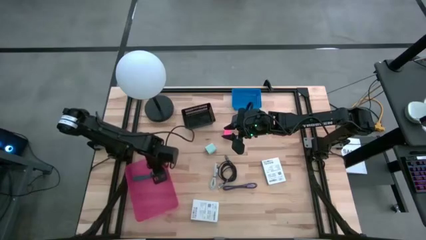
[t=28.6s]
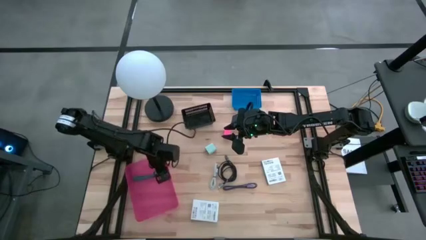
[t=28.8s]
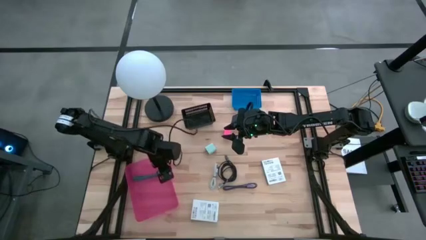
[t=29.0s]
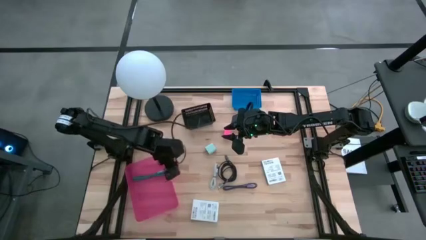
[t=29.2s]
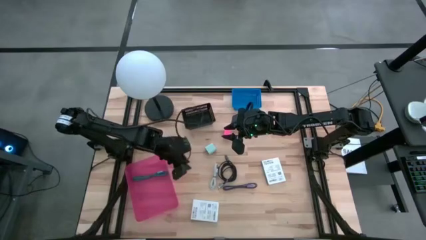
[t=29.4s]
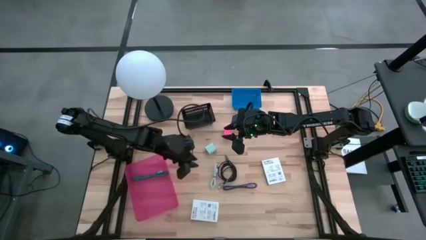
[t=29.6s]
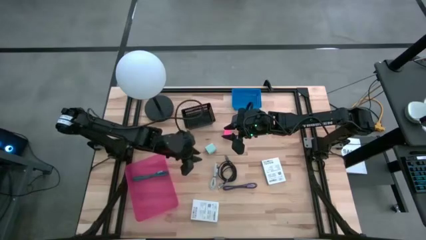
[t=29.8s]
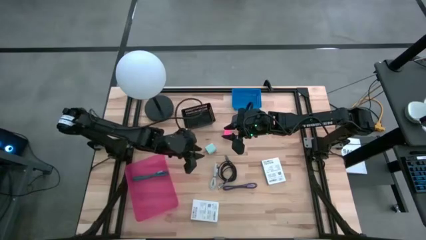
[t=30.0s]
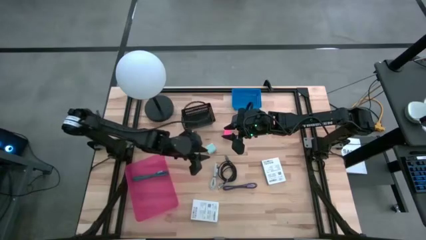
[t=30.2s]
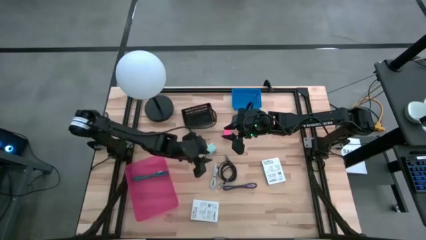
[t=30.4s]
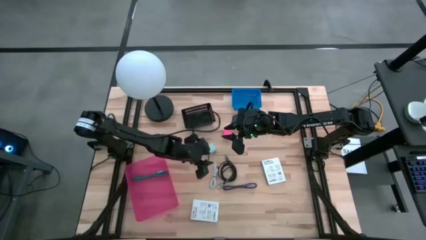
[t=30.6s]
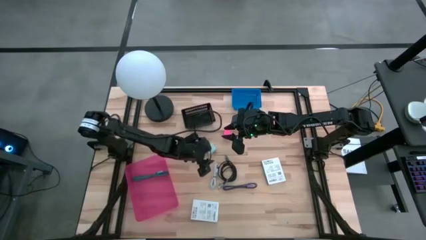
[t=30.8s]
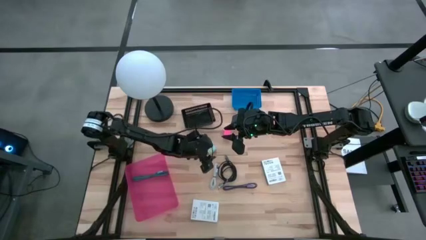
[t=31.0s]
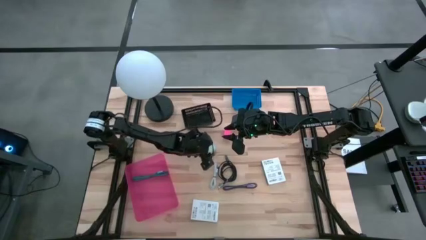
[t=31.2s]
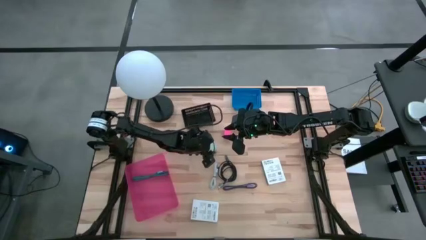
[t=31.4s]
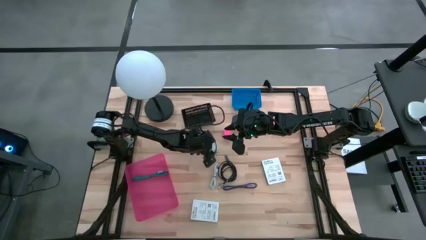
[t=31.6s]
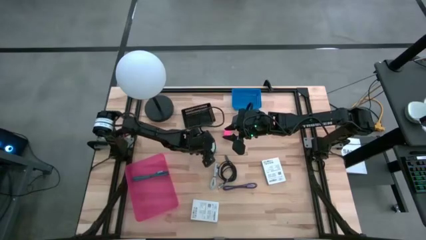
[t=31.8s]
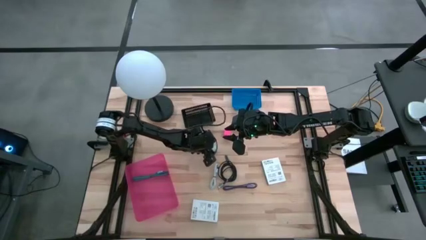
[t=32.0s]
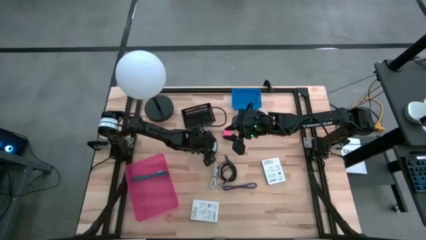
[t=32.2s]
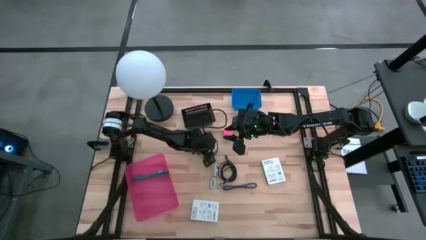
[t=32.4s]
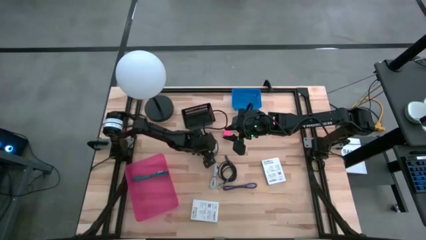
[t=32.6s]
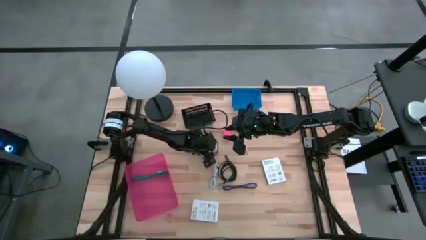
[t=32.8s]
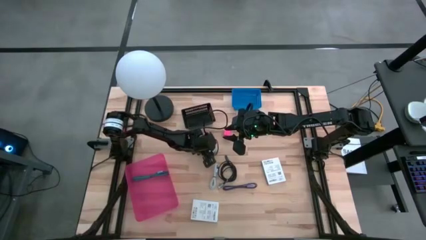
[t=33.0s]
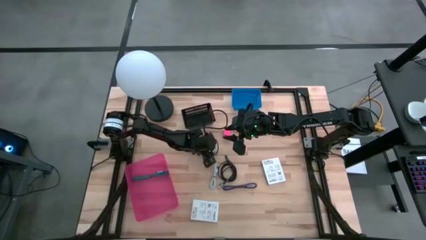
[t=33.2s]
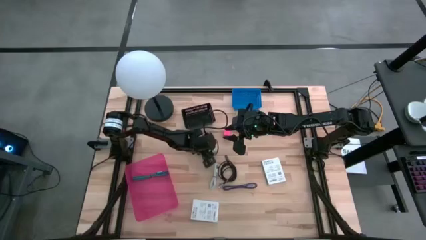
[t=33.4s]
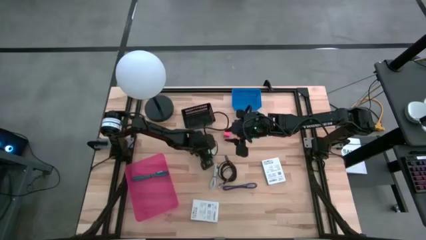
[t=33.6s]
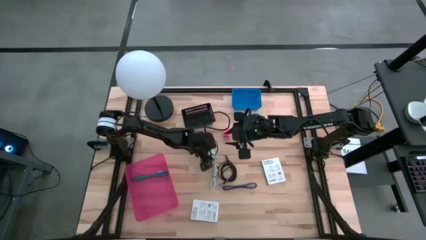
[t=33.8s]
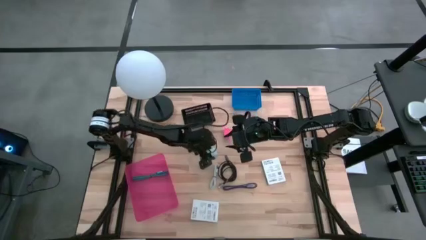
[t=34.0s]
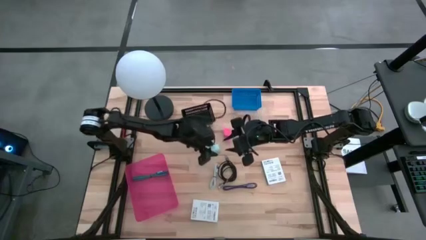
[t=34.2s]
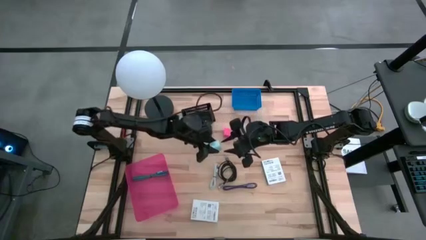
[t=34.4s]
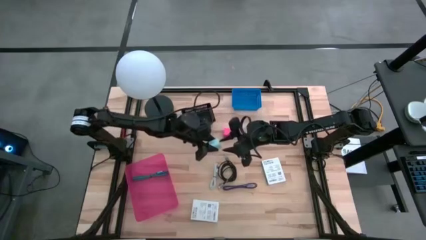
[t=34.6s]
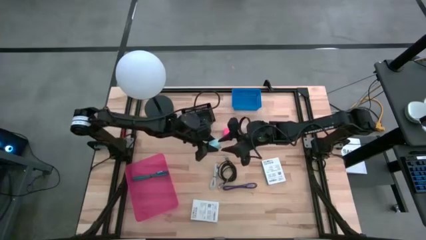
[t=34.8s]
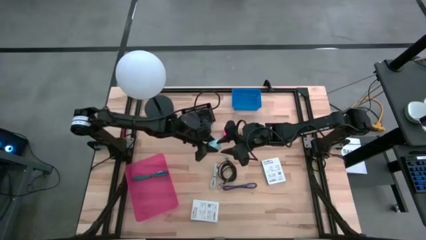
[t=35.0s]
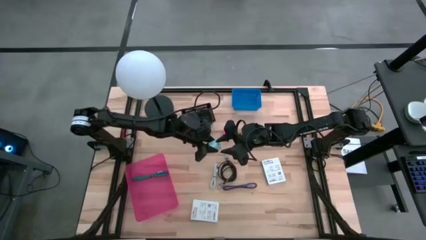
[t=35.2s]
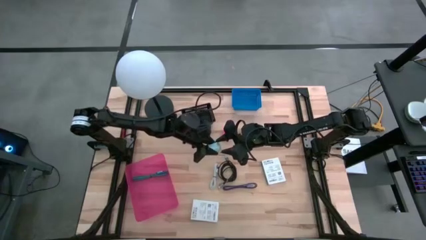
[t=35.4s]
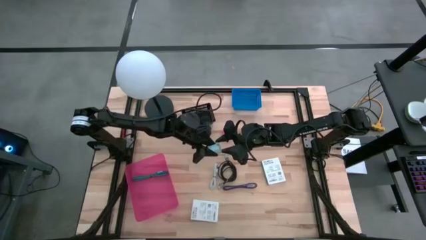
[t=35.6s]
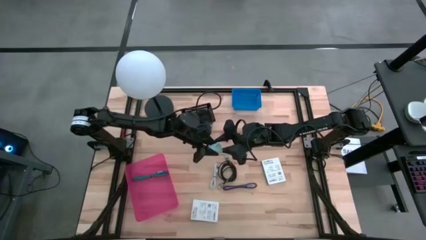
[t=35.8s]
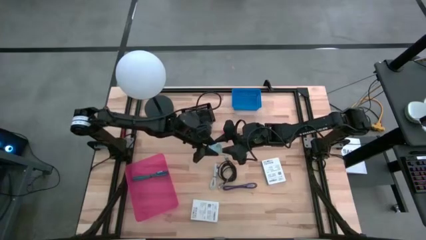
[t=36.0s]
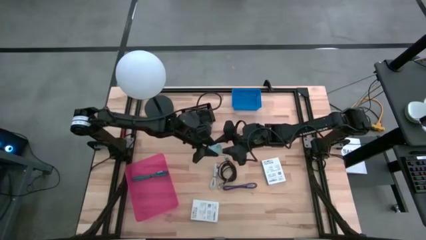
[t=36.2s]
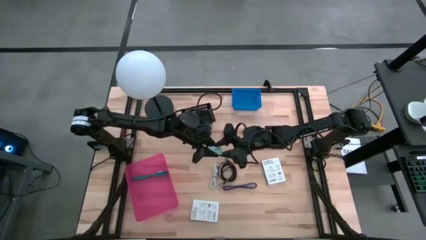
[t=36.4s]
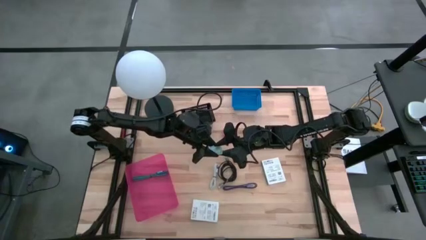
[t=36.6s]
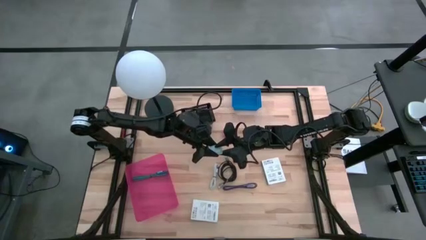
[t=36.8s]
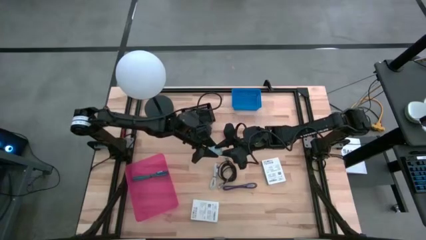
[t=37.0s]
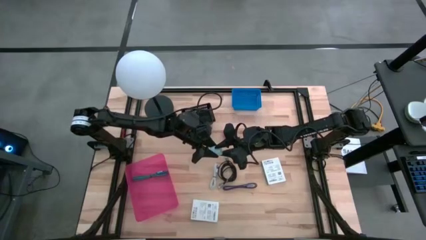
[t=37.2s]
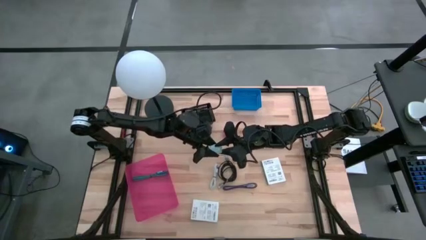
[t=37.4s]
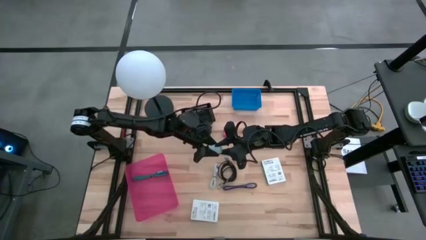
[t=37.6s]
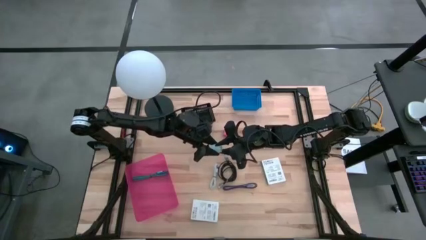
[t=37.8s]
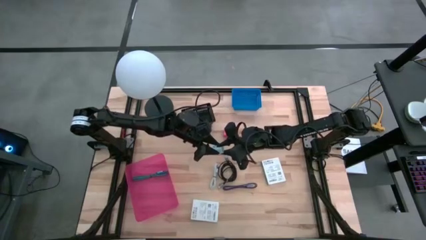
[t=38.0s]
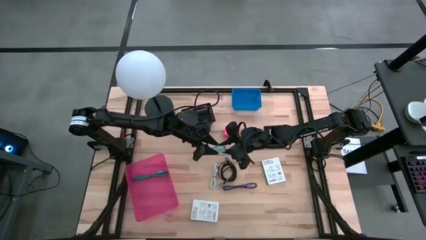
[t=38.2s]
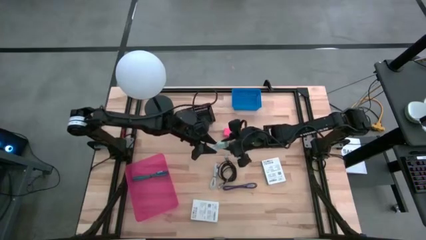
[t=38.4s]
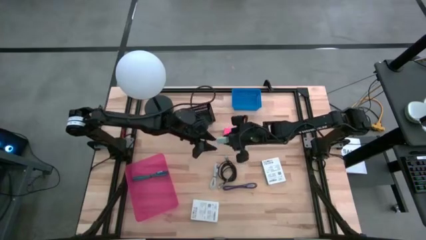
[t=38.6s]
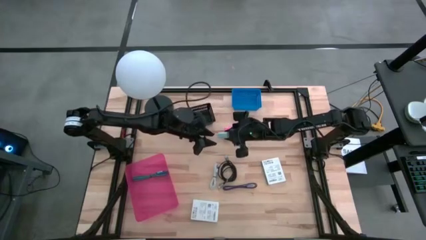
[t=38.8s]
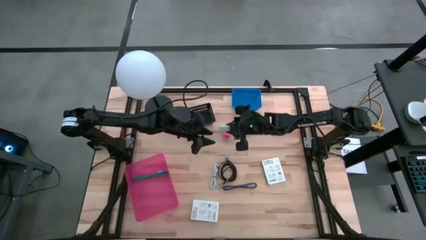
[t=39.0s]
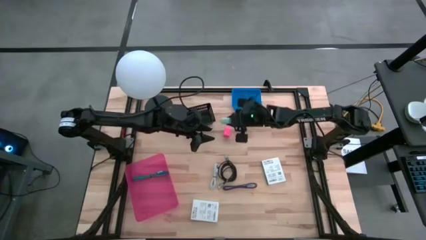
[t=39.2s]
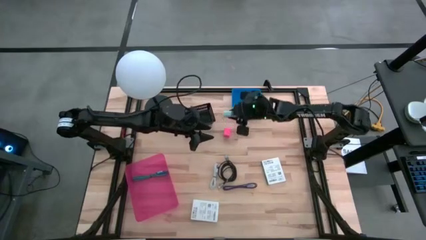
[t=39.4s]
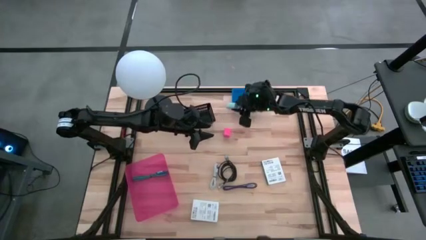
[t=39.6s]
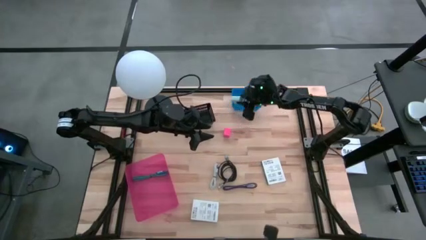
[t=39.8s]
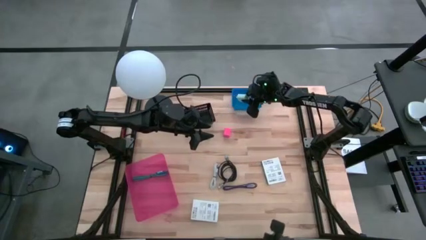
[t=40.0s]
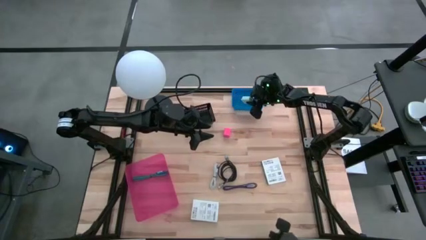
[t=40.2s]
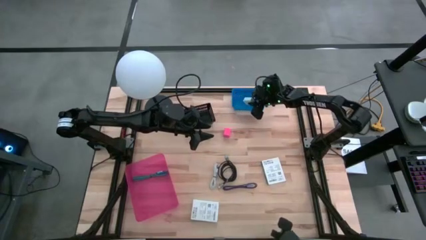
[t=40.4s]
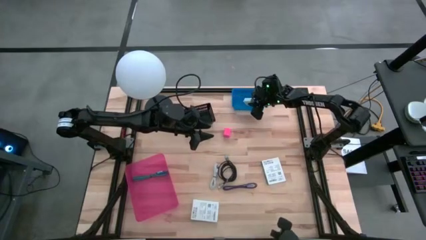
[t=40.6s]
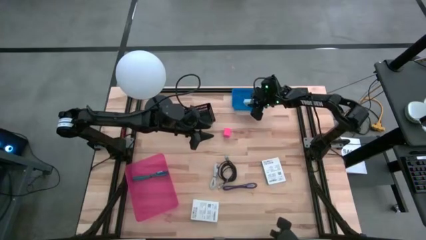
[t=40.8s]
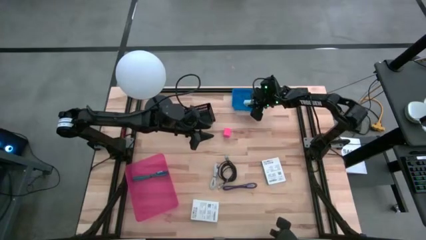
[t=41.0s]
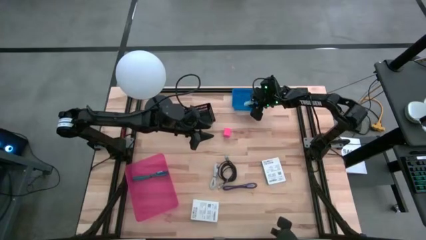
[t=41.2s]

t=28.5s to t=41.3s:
Task: Pick and place items into bin
Put the light blue charger adapter into the blue bin
